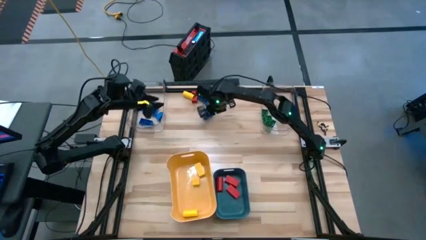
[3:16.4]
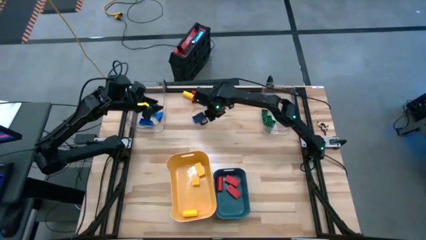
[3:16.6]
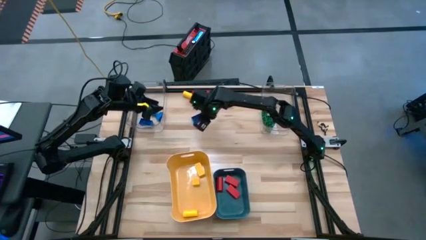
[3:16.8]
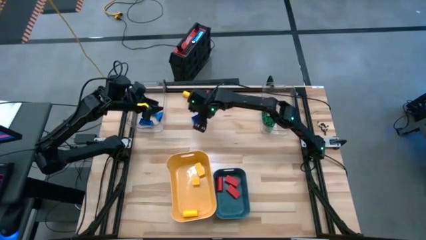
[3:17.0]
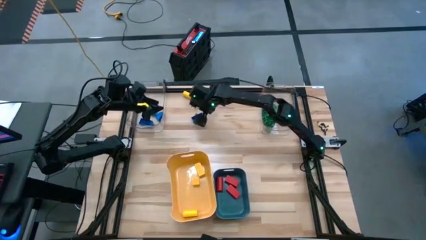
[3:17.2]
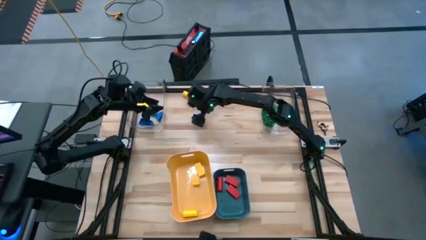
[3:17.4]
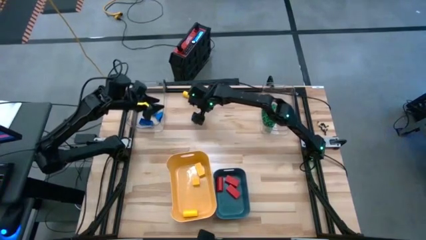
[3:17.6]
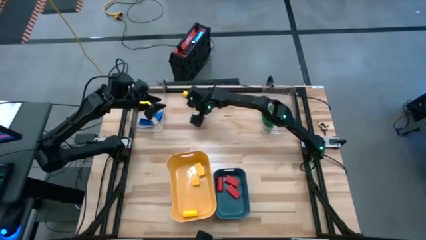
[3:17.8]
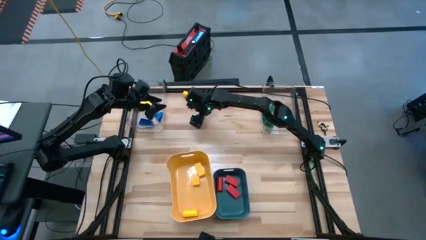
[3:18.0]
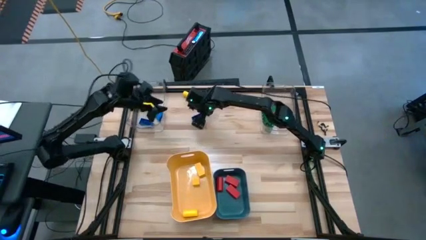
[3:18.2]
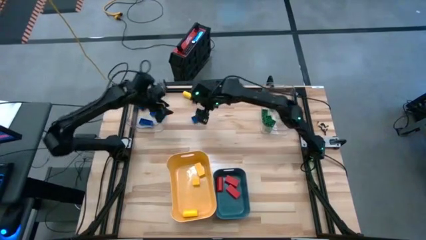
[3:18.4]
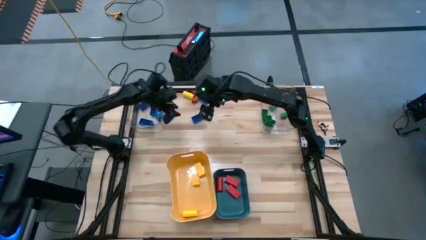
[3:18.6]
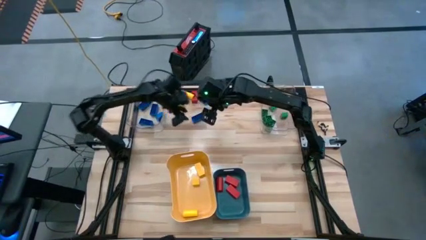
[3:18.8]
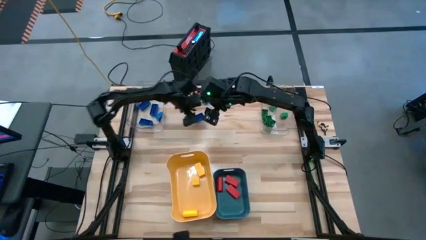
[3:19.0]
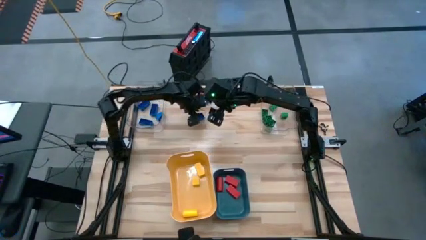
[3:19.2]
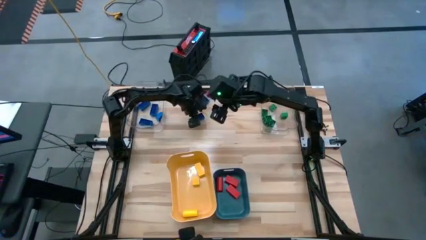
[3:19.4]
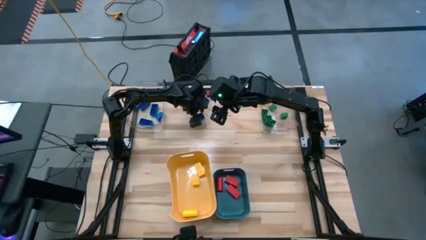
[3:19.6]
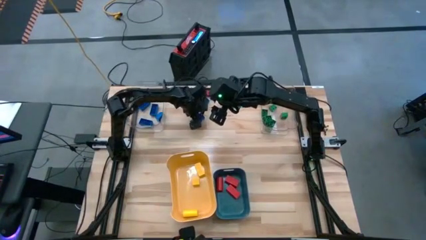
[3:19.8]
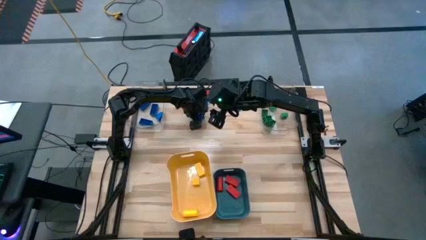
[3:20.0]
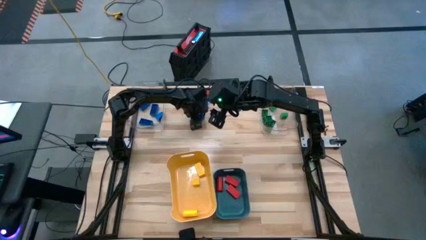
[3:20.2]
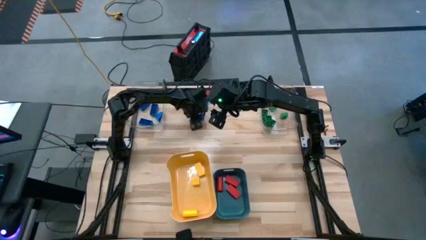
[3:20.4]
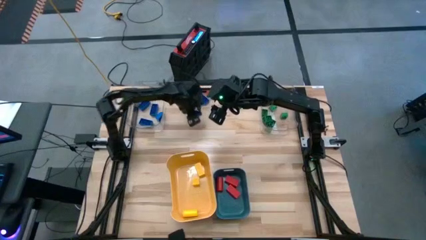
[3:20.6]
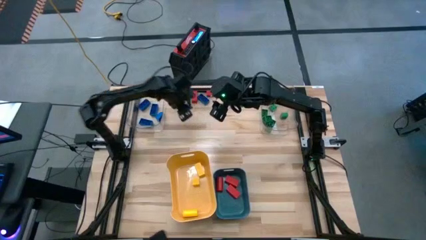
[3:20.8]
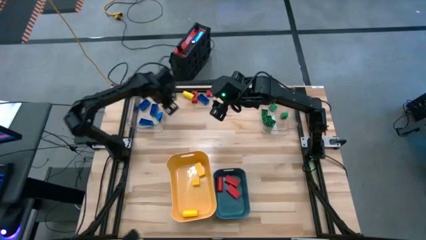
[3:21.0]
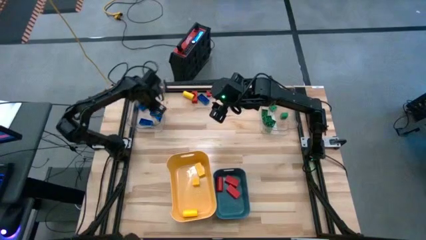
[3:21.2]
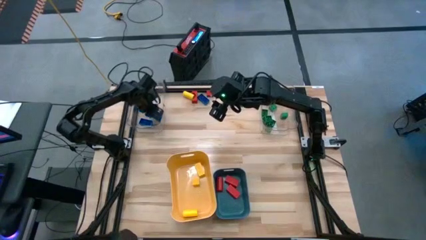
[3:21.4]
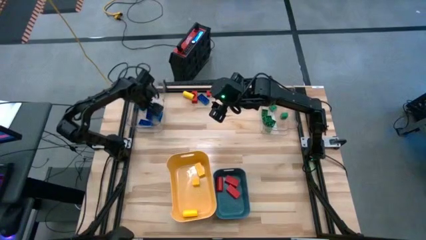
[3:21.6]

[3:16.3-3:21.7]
Task: Sort blocks
Put the blue game piece into the left transparent bin

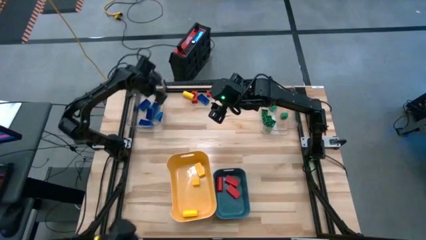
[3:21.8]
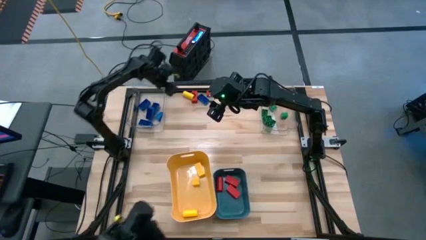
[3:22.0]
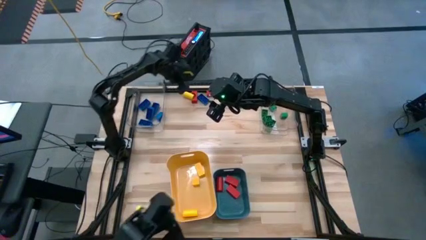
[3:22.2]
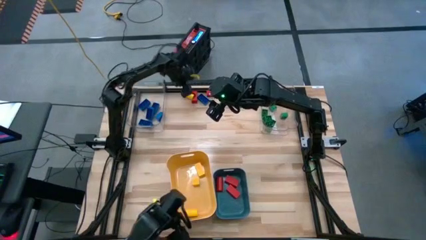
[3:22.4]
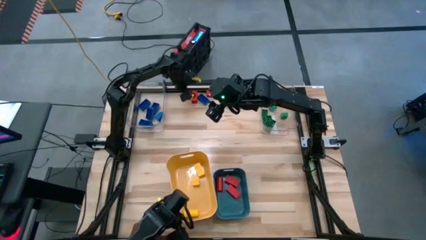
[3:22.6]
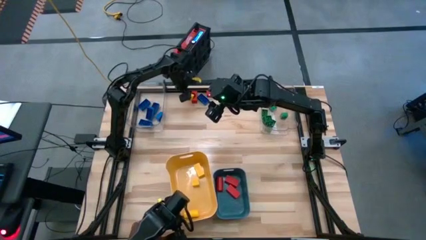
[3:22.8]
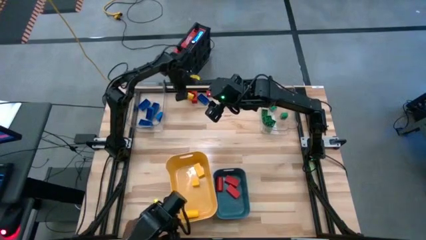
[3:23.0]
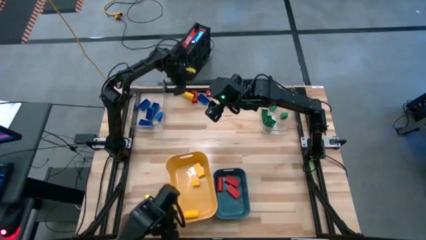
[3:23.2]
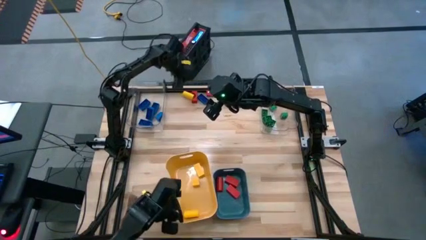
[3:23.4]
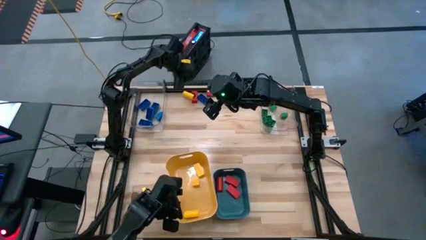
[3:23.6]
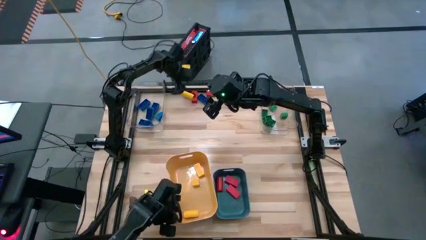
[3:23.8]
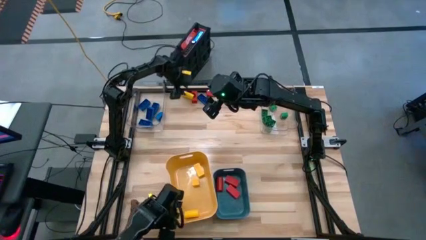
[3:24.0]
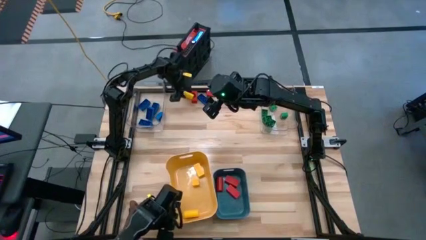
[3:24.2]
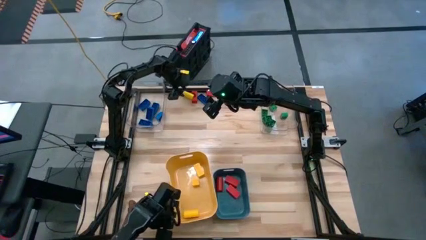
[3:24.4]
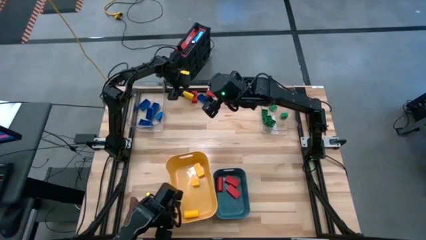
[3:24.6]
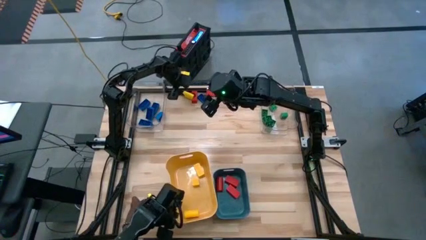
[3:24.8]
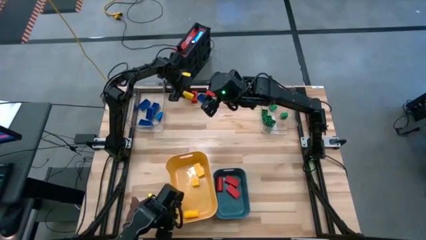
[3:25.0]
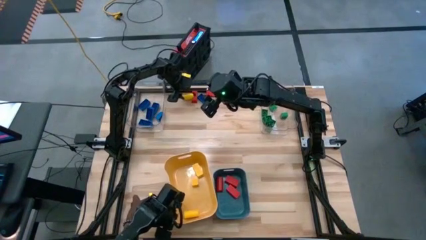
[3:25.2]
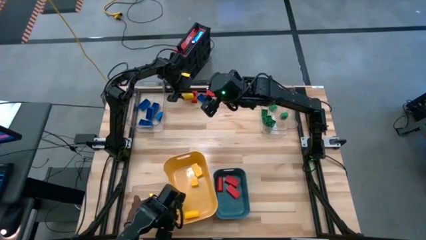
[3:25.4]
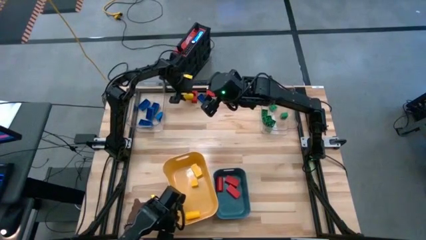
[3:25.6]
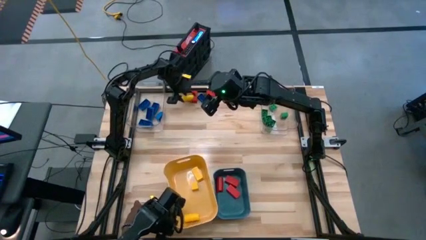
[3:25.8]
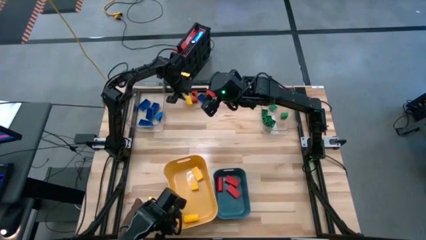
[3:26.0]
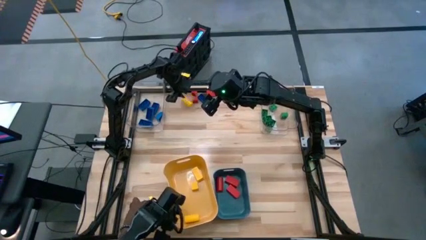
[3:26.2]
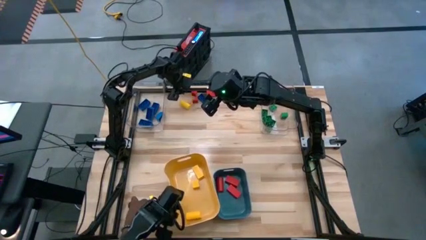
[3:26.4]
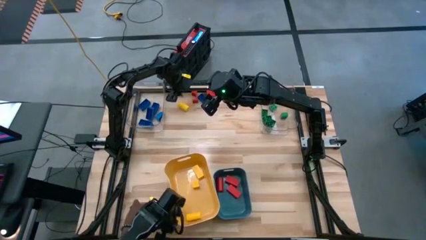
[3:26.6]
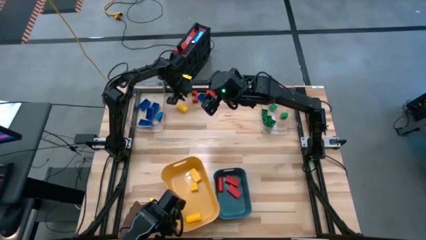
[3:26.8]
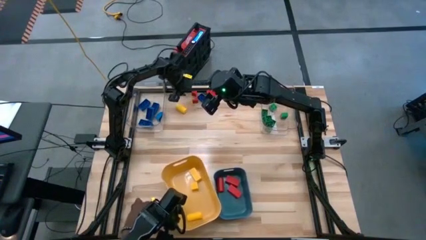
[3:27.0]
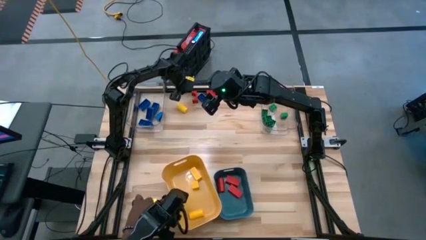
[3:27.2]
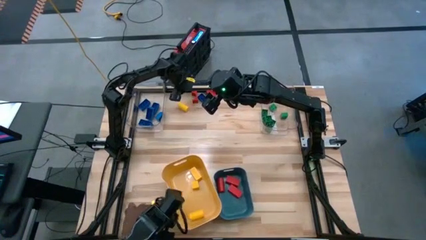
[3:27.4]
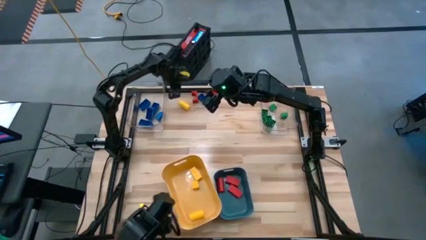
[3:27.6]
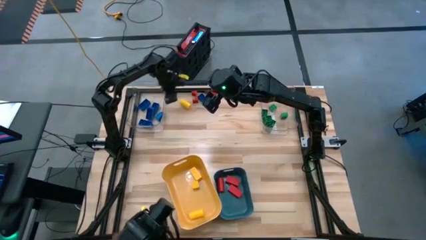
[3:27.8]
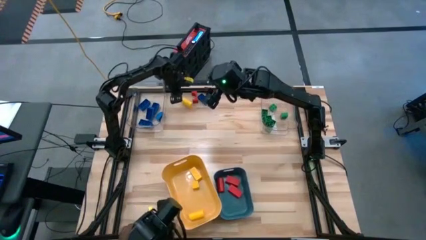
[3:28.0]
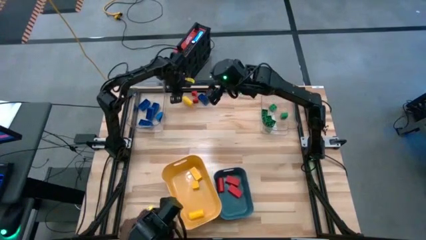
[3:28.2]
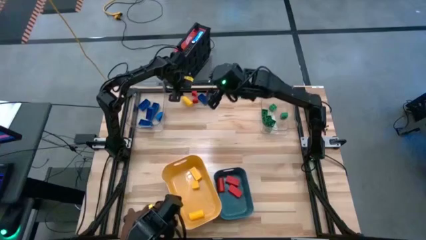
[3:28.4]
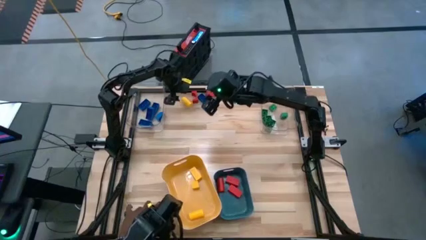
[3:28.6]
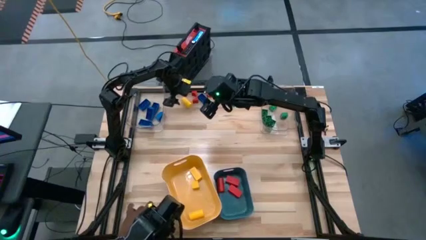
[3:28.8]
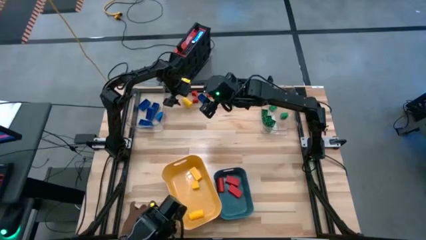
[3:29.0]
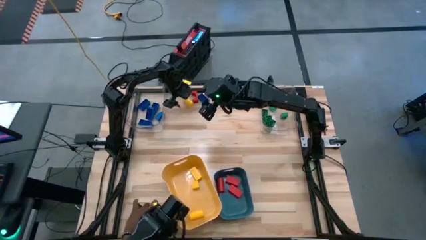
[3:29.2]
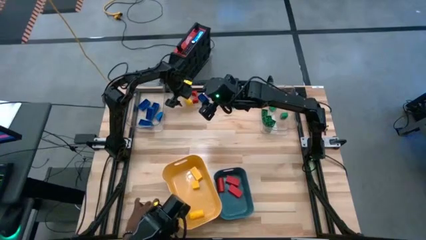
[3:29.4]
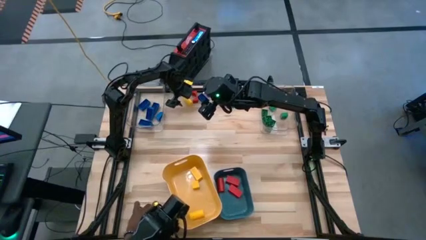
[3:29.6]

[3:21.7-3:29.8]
Put the yellow block into the yellow bin

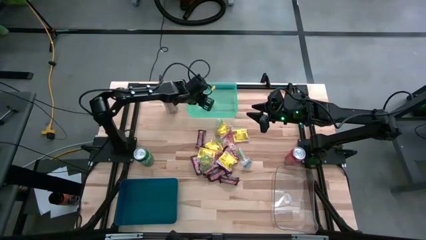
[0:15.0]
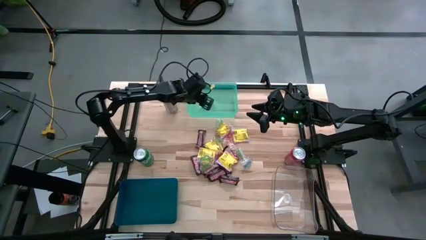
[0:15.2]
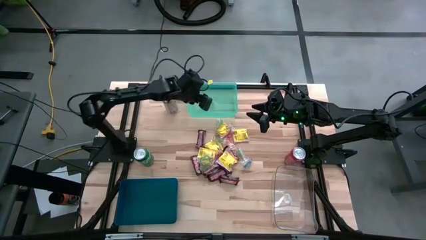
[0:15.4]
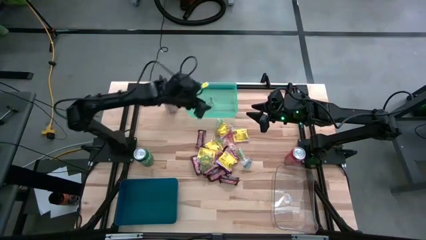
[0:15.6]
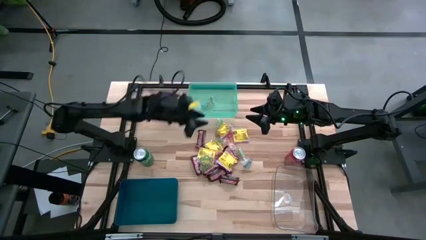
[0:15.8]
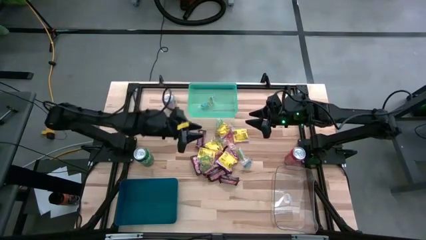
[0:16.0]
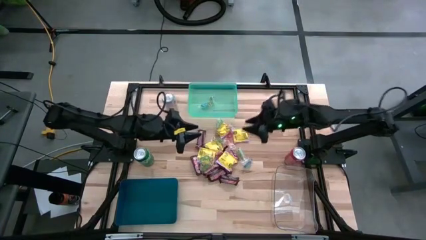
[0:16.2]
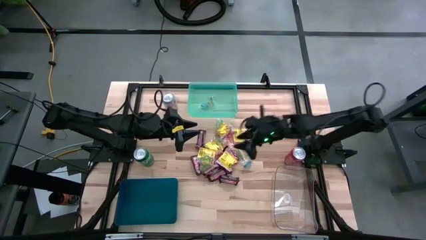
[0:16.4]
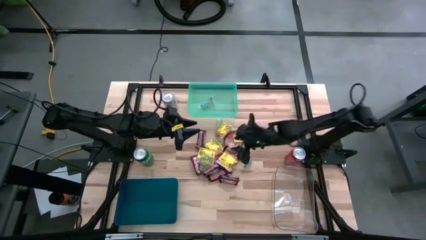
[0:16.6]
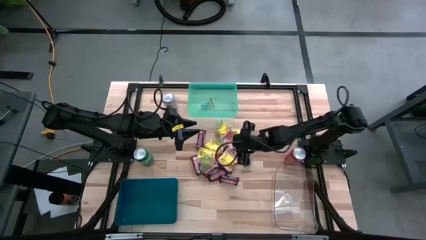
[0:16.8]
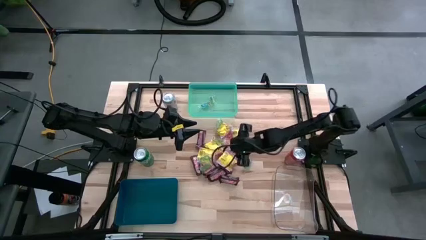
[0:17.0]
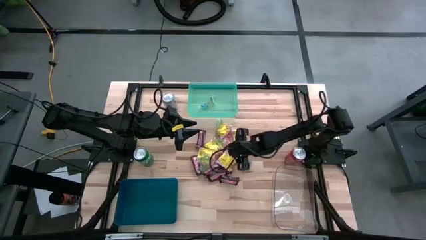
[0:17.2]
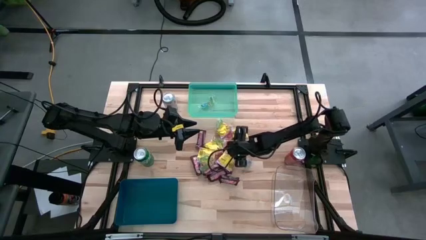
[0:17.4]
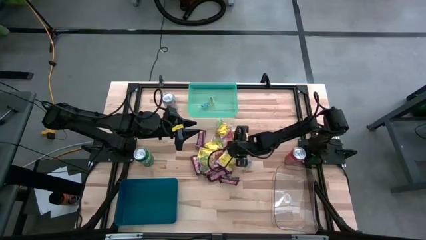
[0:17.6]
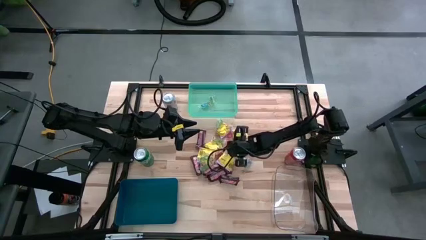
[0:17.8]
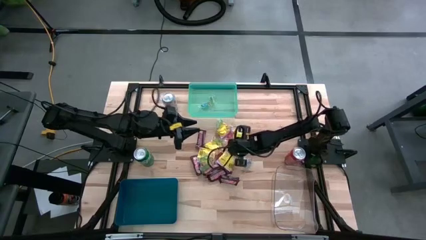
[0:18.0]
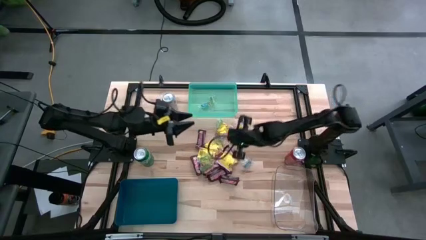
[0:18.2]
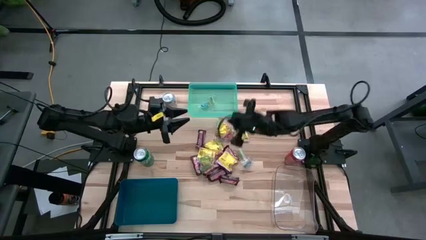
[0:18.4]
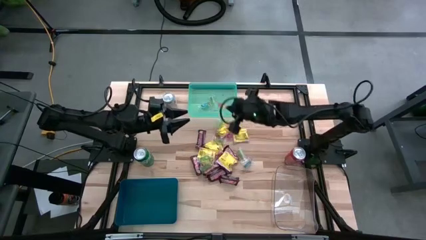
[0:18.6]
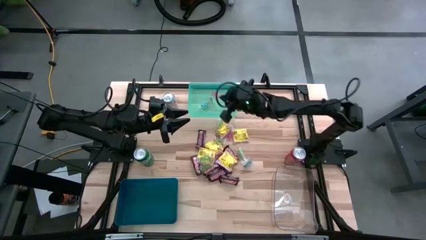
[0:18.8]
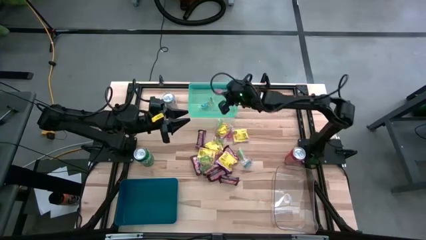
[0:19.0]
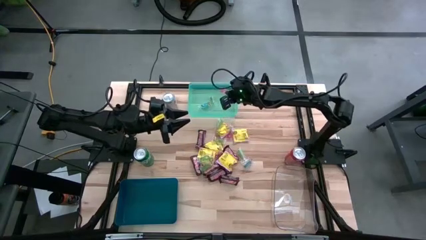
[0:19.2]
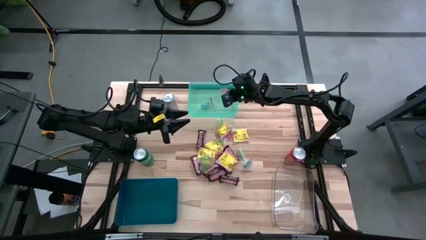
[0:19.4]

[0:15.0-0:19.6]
Task: Sort candy
Put the orange gummy into the light blue bin
